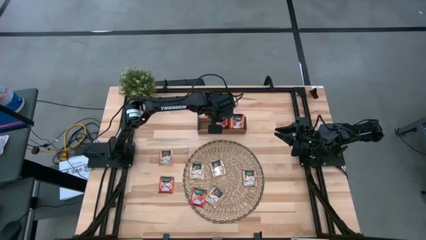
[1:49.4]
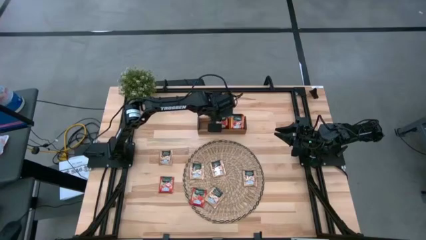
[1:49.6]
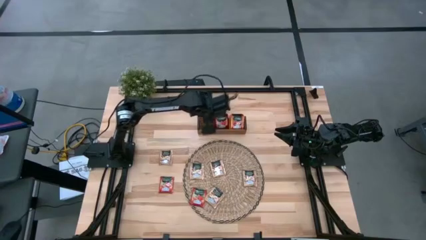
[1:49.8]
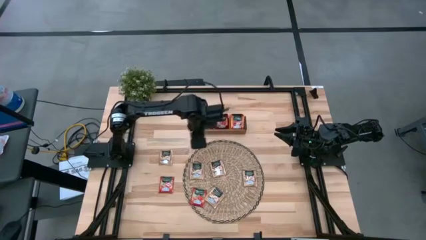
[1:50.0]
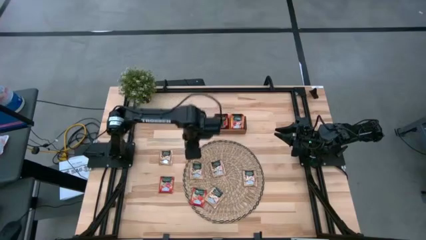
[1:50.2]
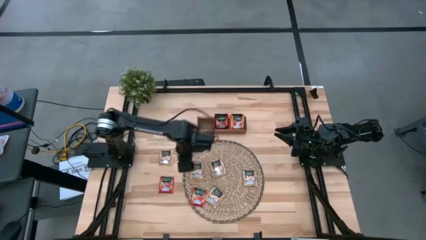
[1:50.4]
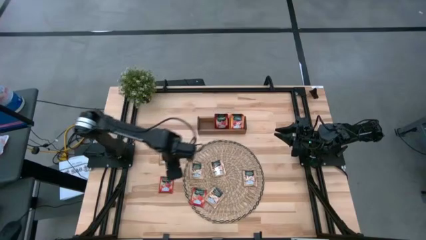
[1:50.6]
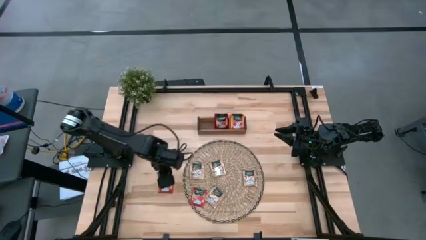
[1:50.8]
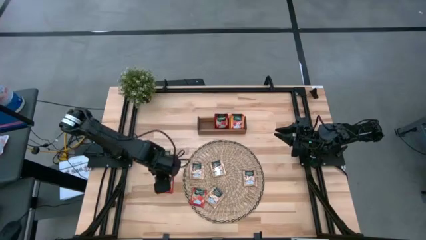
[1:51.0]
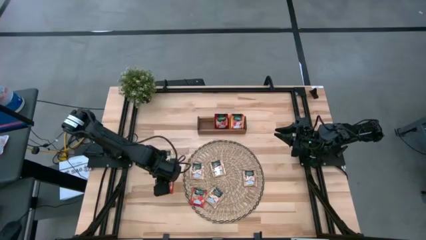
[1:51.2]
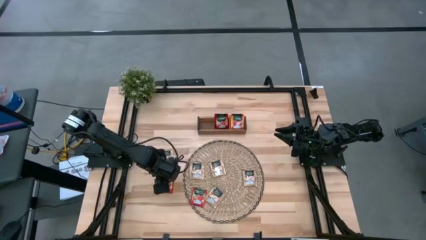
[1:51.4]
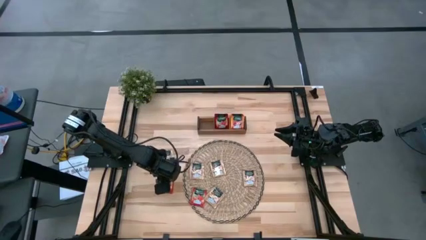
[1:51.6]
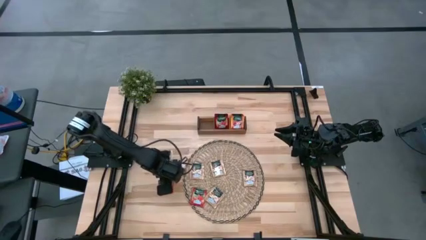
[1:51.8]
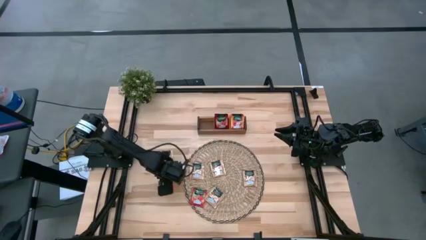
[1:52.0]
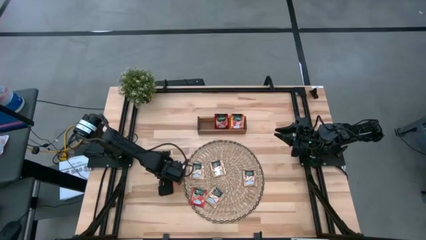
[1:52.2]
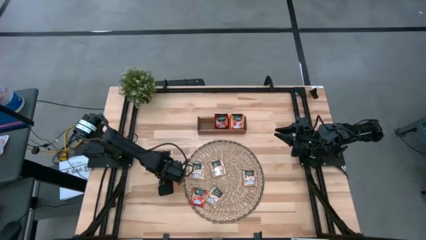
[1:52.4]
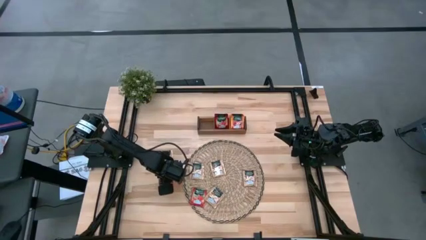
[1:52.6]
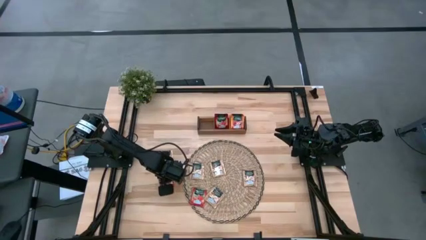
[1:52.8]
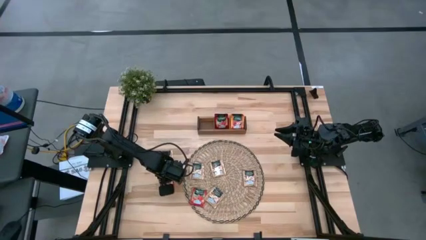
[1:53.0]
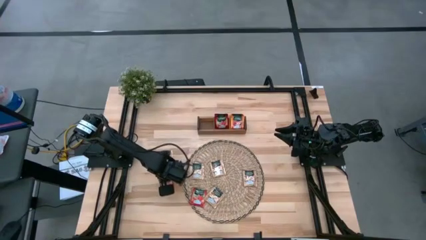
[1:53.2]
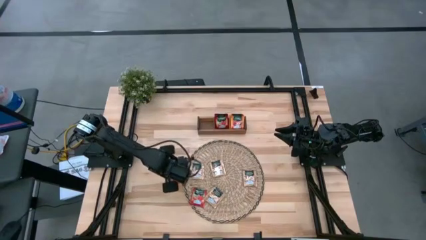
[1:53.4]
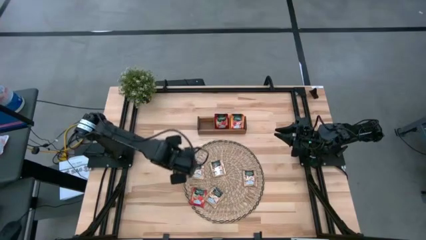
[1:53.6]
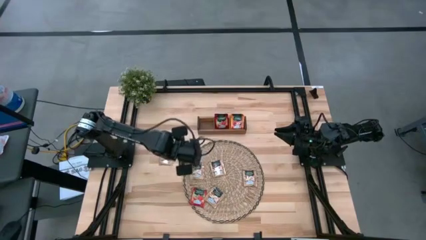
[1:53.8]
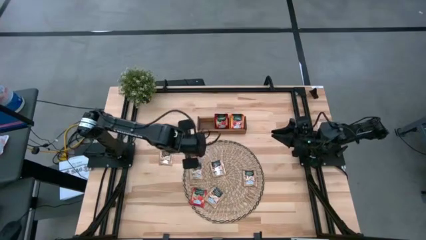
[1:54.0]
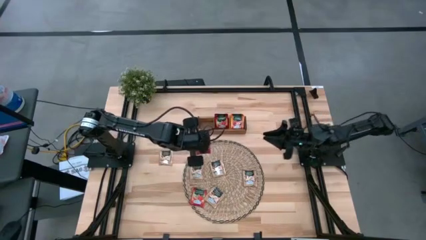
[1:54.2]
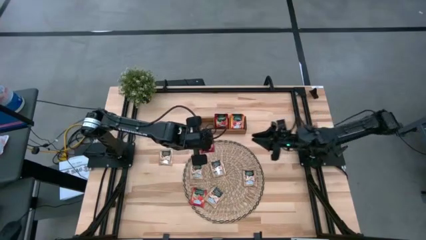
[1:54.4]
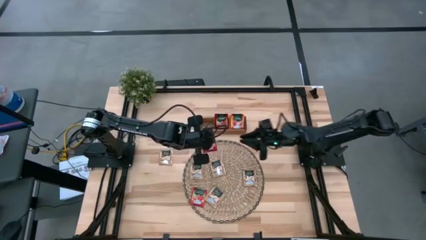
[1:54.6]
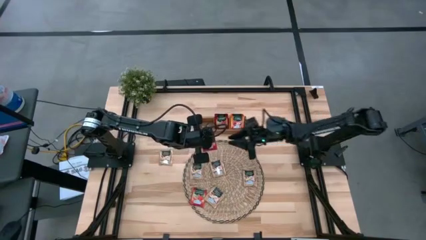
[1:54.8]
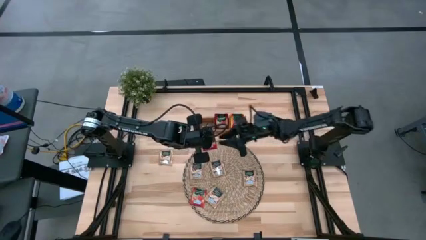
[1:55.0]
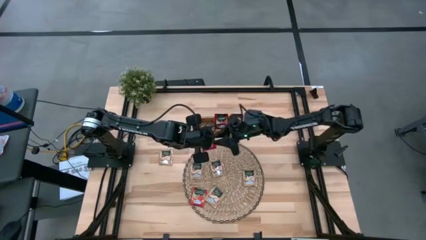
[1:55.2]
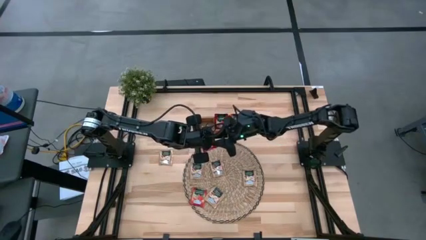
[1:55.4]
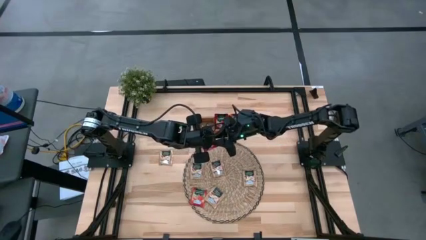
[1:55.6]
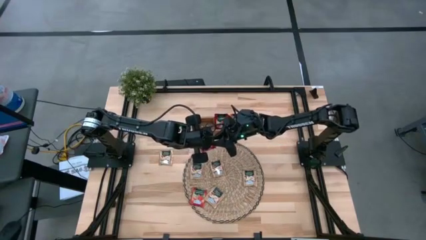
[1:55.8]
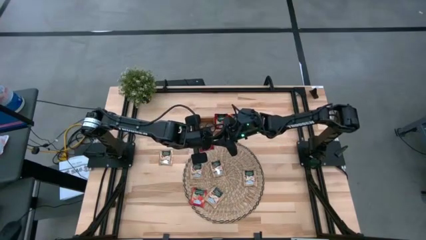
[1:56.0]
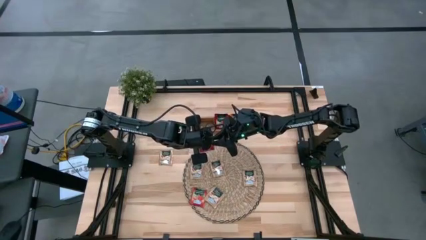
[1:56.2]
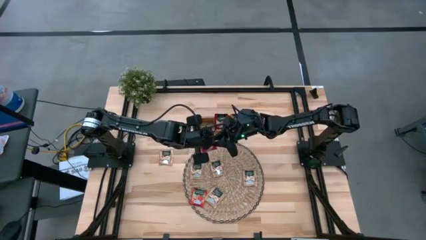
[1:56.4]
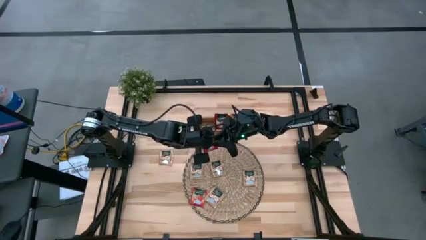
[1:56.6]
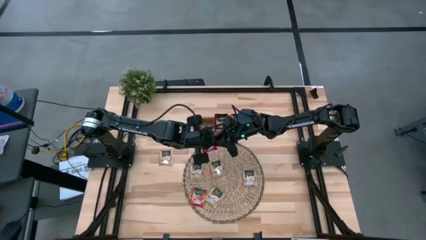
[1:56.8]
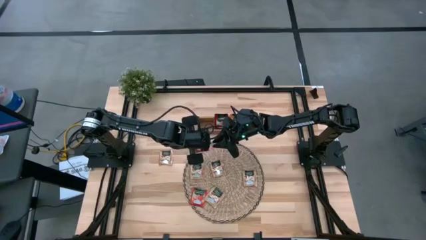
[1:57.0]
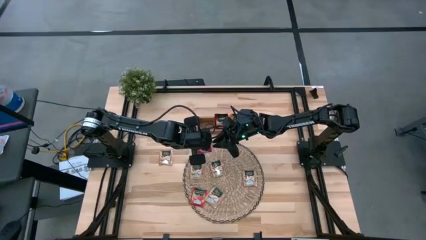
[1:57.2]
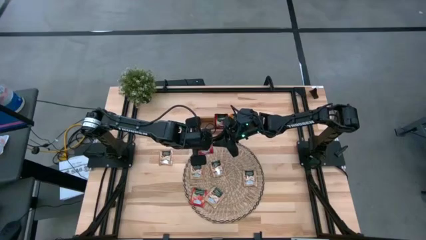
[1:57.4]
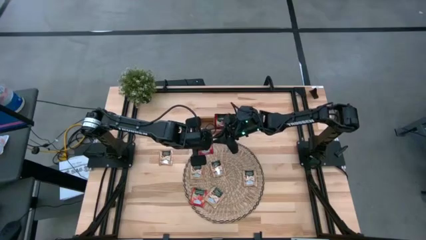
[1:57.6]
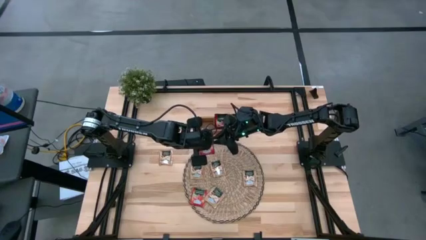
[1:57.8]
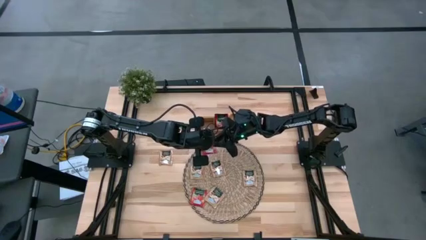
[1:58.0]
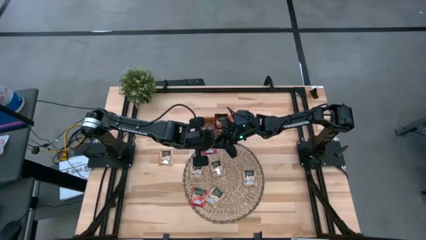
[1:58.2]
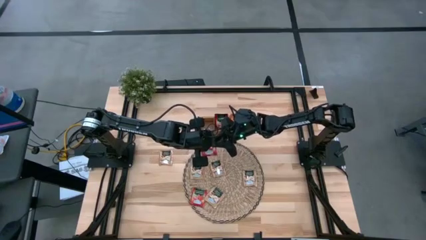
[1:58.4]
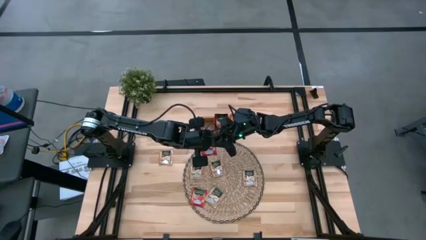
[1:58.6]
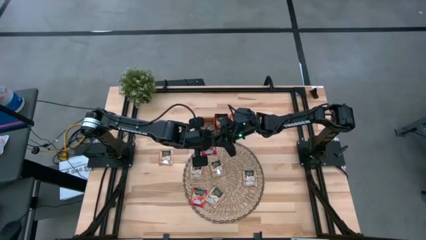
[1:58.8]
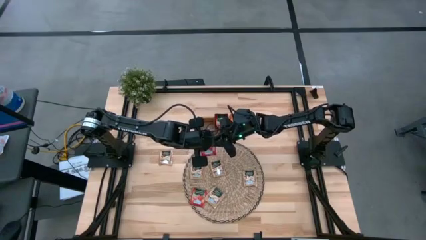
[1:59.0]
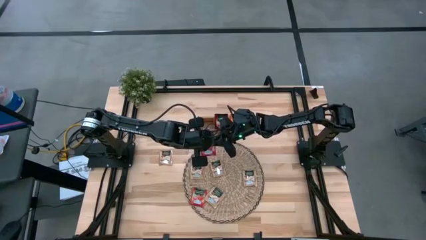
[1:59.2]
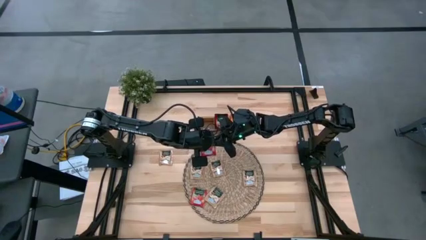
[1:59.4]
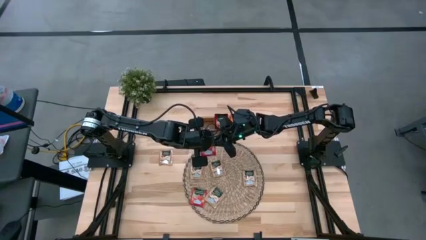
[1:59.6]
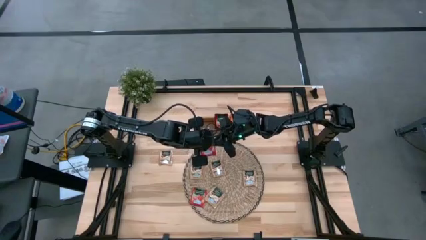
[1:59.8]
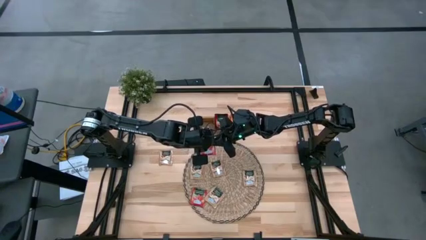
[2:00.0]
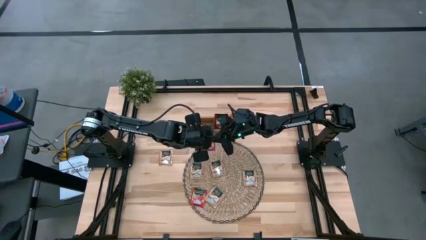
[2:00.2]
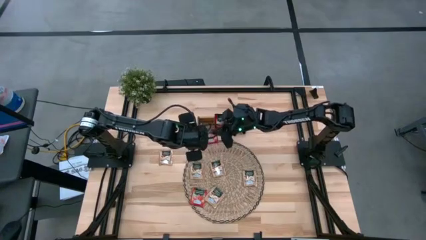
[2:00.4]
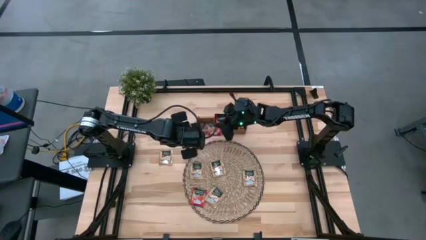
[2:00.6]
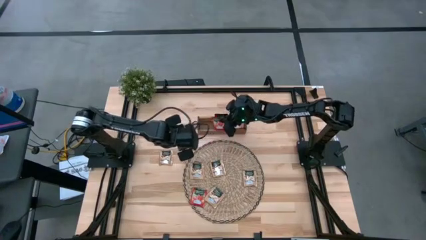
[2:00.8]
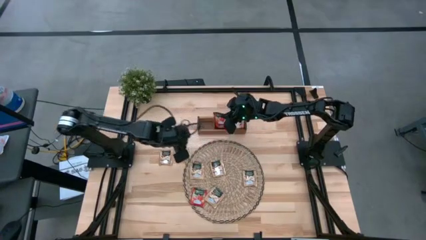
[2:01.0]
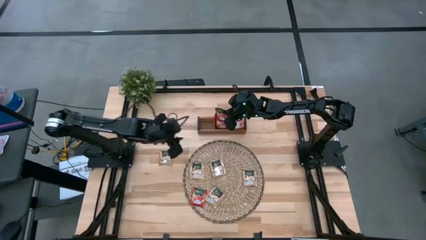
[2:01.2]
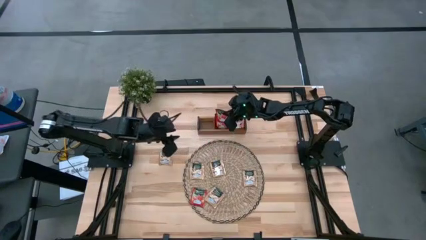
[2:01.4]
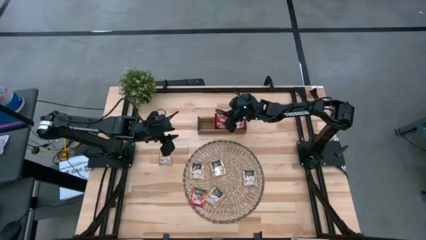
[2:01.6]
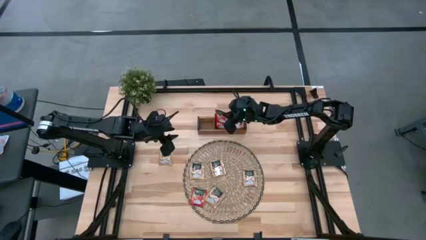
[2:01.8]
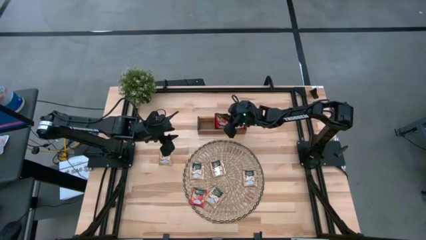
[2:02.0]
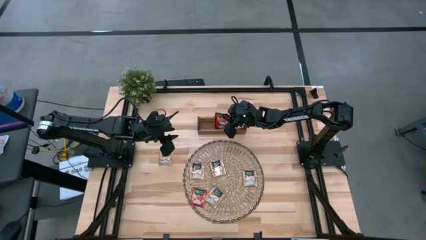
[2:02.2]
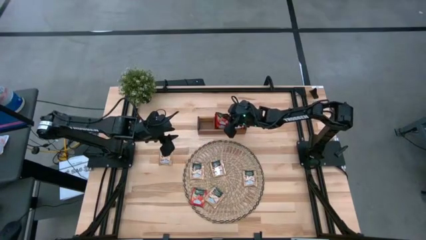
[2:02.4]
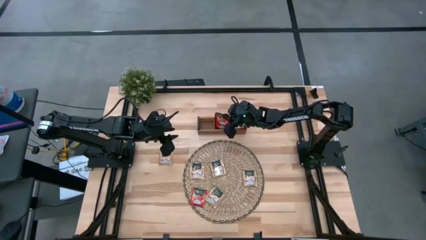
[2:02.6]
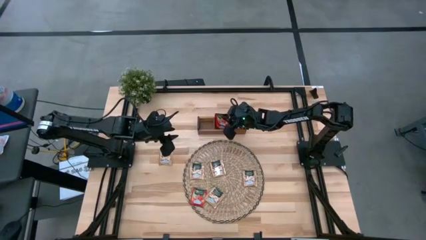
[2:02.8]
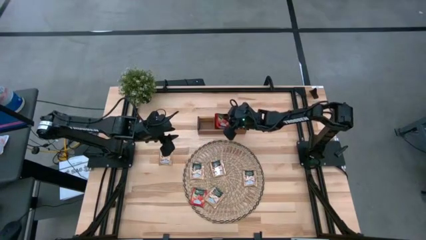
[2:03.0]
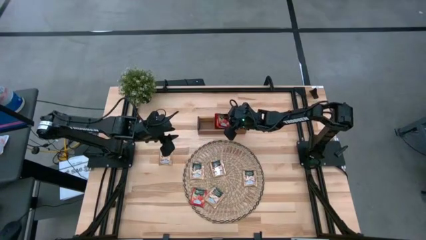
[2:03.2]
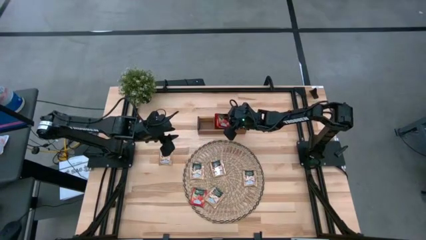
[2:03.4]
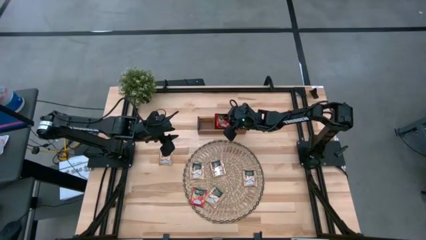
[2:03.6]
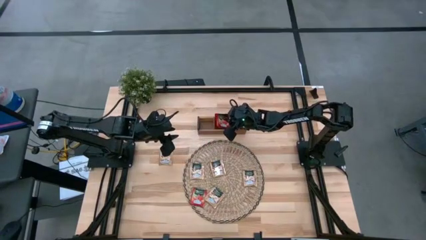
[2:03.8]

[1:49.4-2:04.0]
Task: Pick & Place Tea
Put the red tea bag in the middle of the wooden organizer

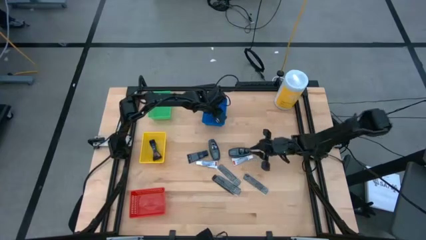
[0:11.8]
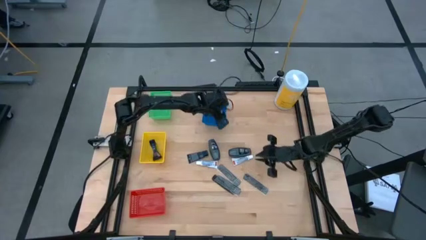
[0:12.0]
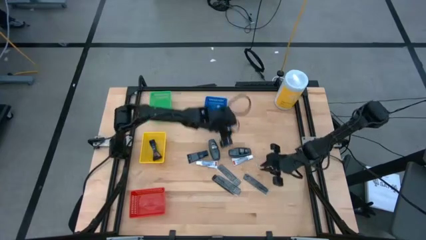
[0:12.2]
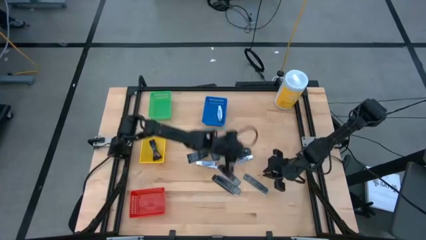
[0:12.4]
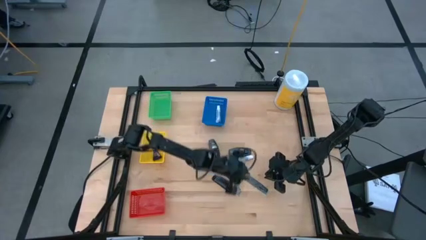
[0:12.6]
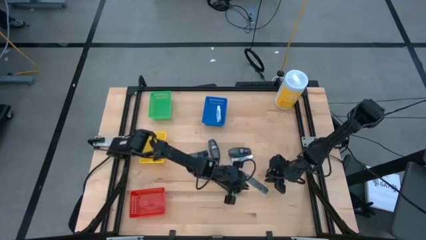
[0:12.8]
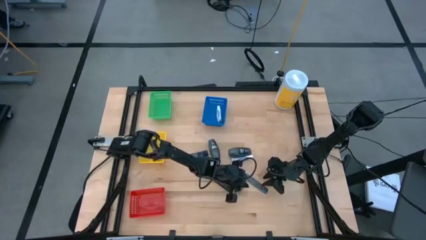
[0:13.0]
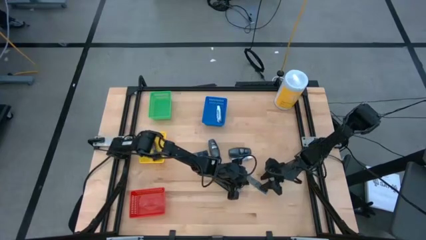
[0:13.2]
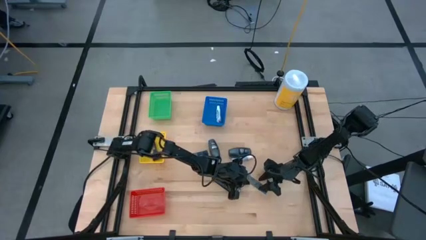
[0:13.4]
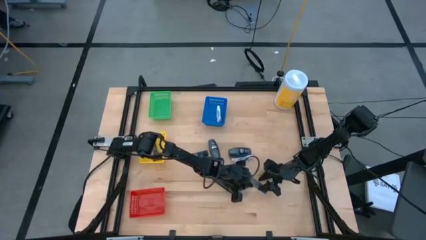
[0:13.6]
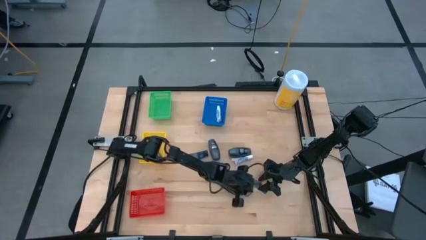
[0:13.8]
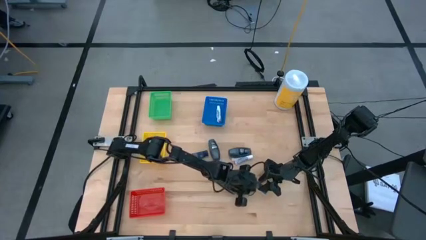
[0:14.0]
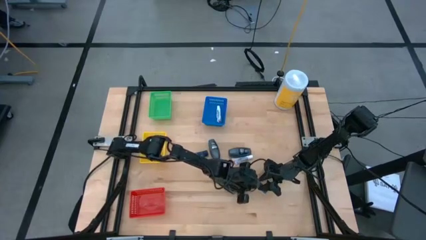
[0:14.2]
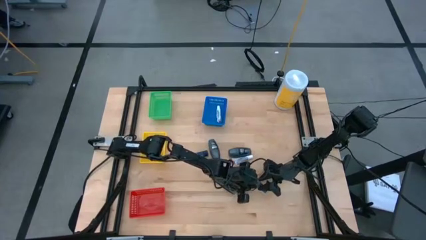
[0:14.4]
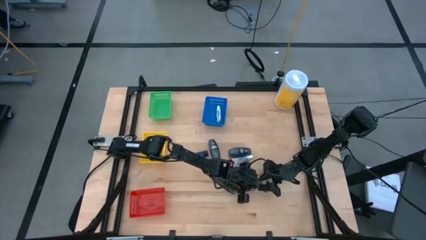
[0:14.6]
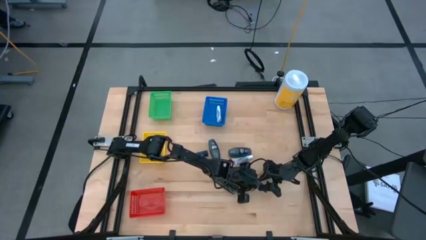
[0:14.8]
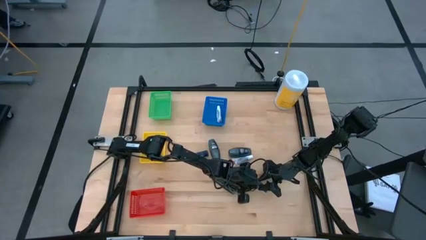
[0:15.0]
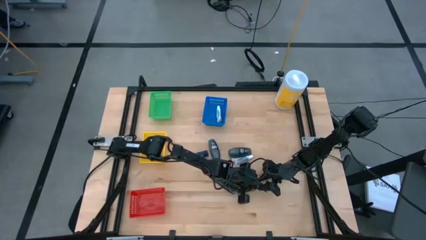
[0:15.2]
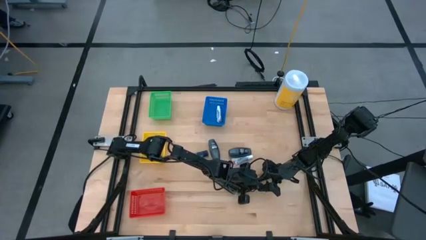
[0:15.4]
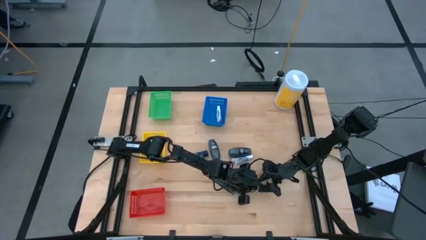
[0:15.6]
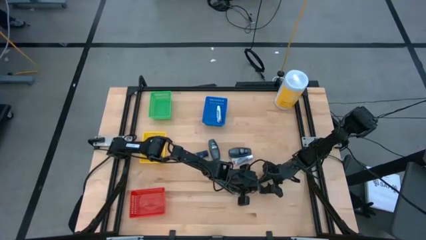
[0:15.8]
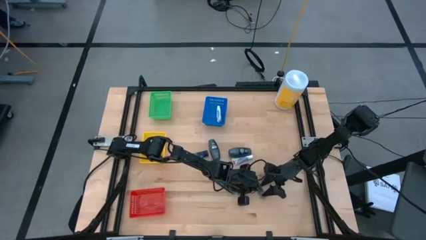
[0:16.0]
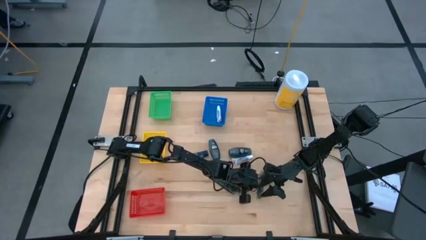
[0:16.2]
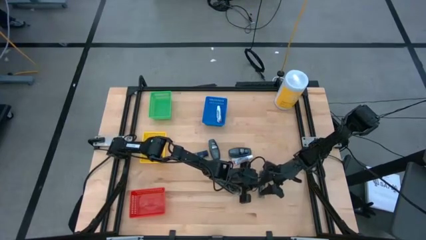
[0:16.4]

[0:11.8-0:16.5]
Task: Pick & Place Travel size toiletries
Put the black comb in the red basket
